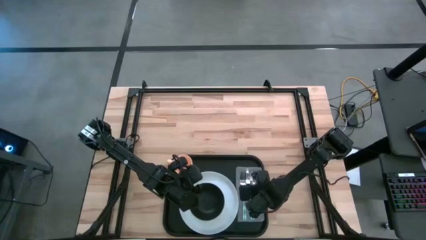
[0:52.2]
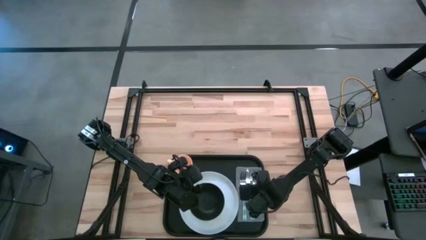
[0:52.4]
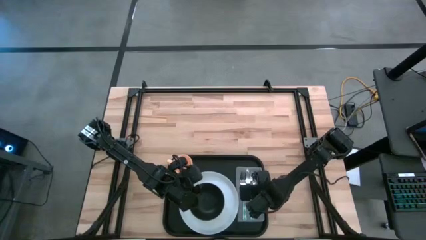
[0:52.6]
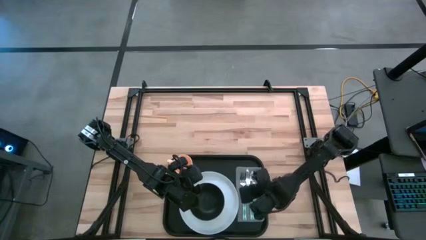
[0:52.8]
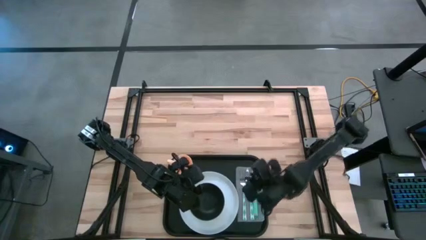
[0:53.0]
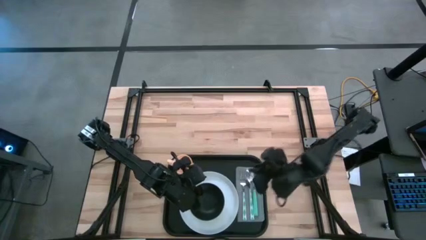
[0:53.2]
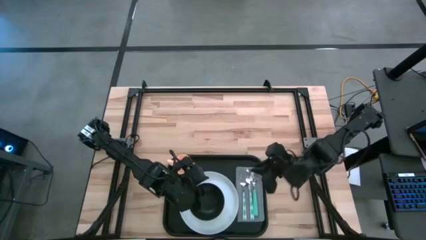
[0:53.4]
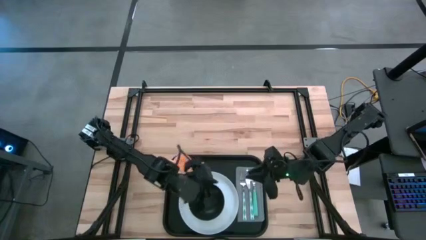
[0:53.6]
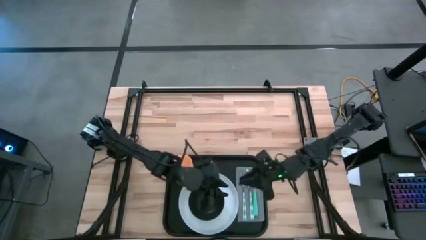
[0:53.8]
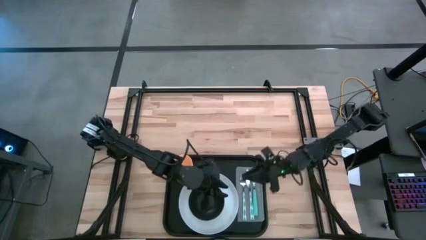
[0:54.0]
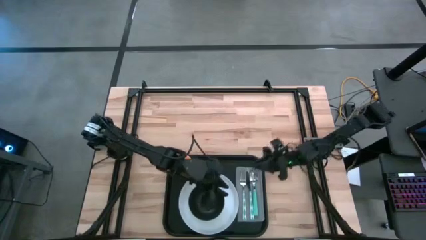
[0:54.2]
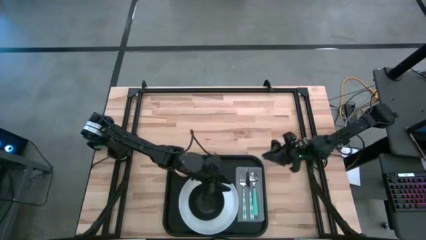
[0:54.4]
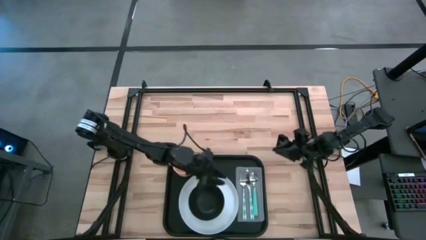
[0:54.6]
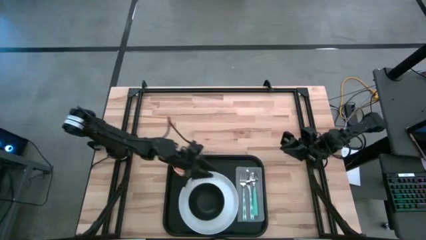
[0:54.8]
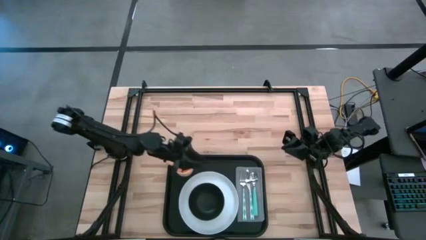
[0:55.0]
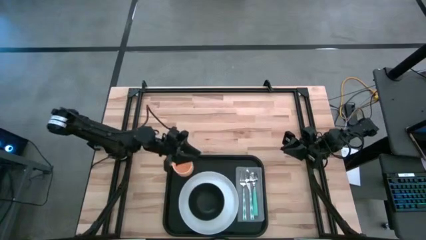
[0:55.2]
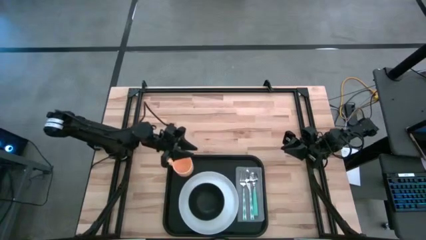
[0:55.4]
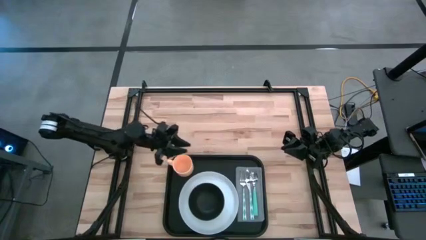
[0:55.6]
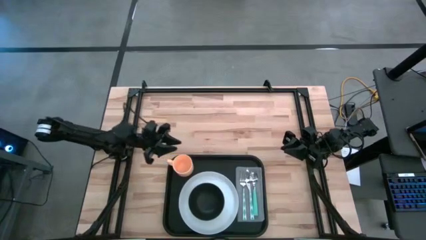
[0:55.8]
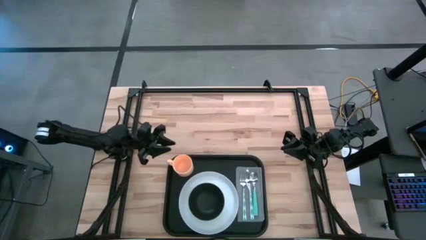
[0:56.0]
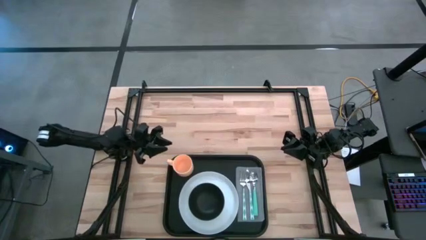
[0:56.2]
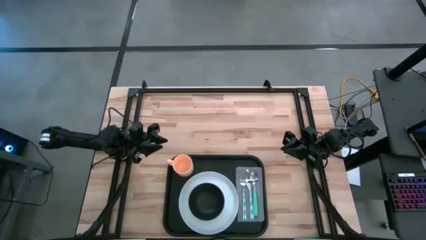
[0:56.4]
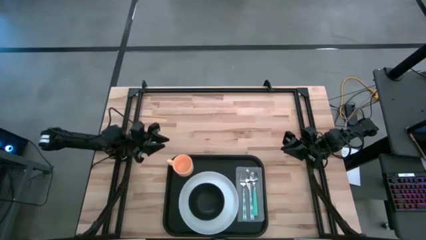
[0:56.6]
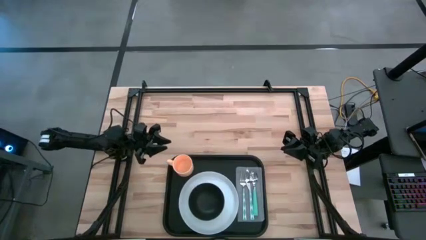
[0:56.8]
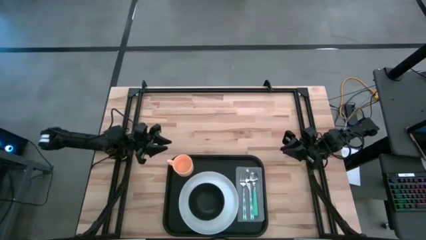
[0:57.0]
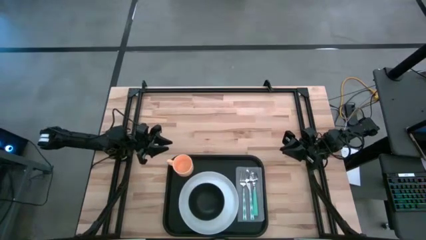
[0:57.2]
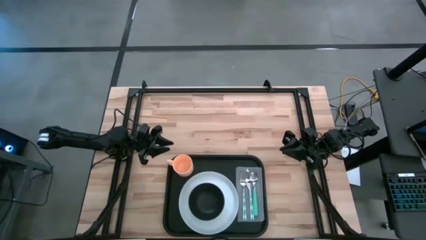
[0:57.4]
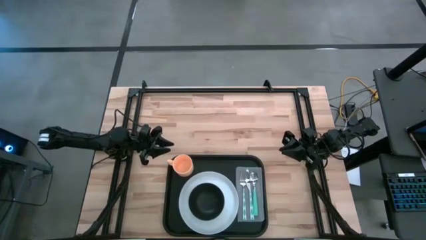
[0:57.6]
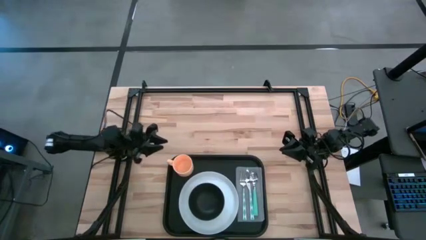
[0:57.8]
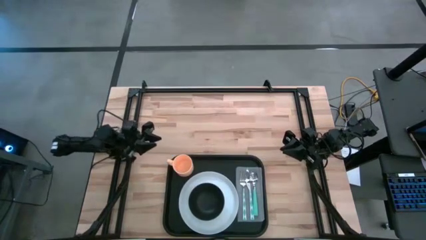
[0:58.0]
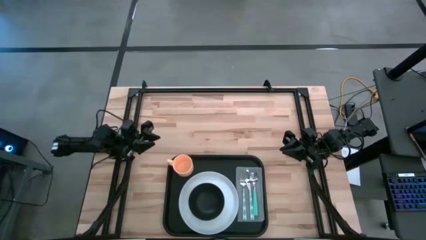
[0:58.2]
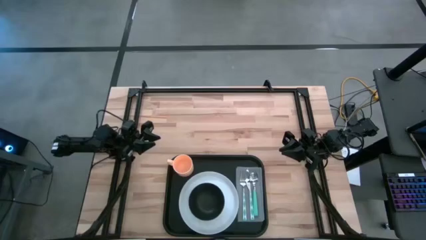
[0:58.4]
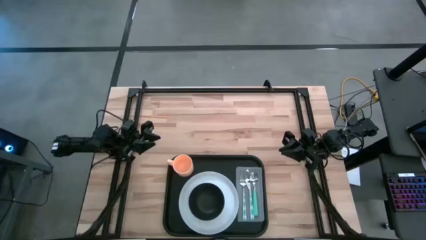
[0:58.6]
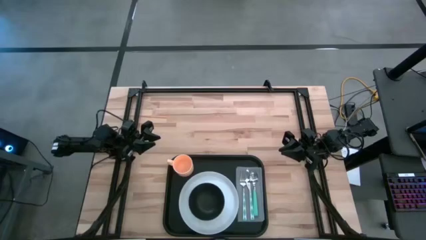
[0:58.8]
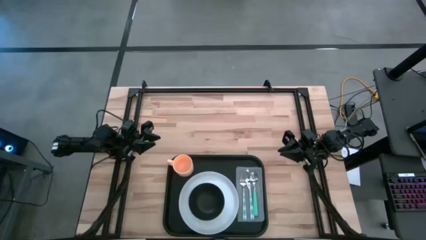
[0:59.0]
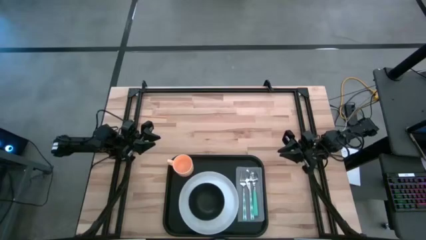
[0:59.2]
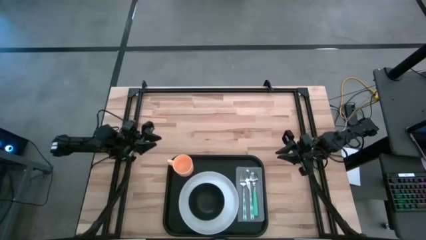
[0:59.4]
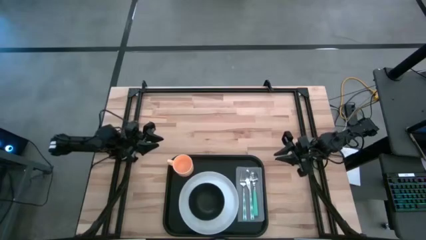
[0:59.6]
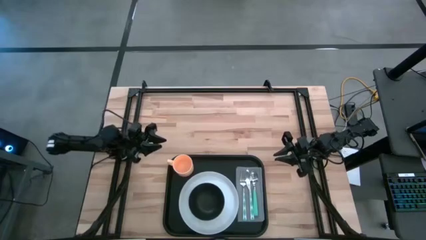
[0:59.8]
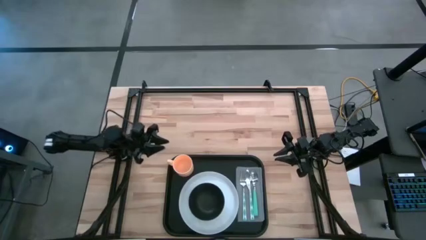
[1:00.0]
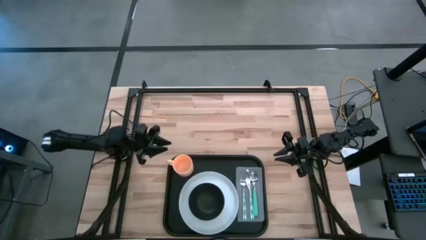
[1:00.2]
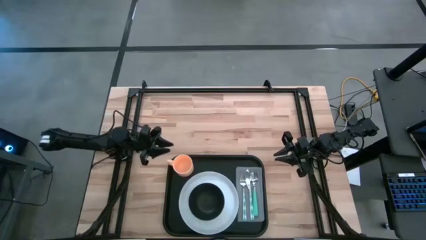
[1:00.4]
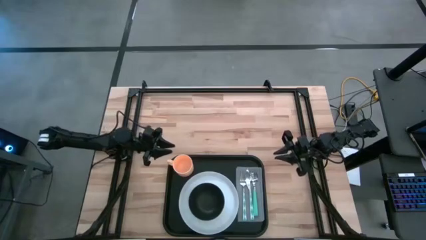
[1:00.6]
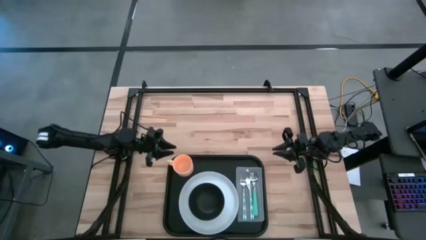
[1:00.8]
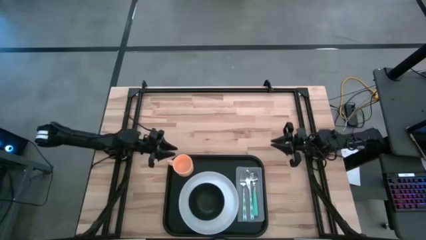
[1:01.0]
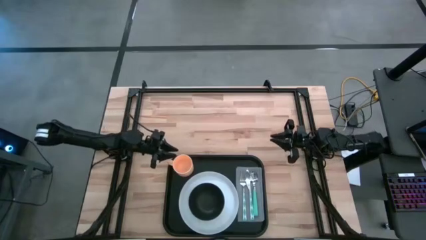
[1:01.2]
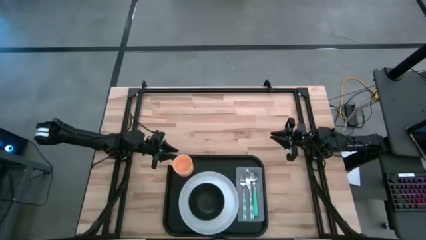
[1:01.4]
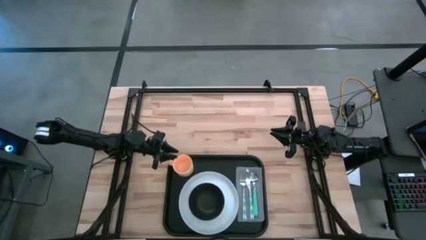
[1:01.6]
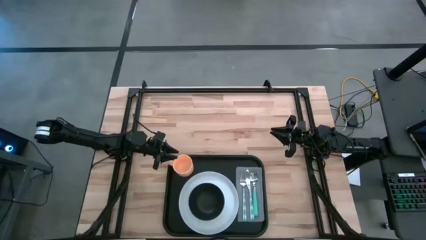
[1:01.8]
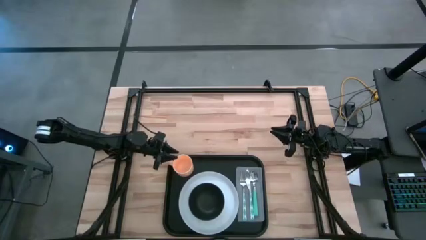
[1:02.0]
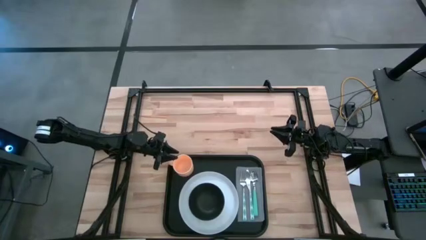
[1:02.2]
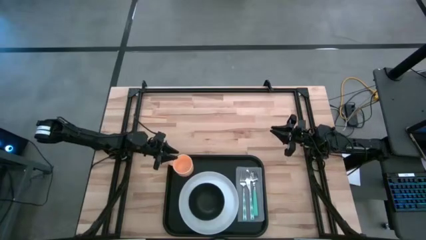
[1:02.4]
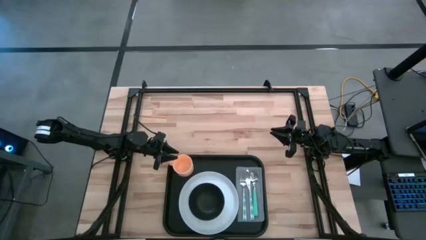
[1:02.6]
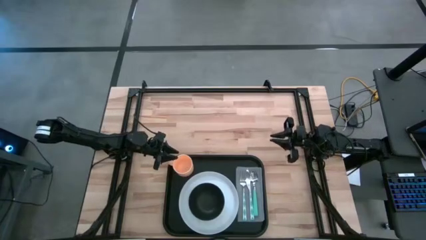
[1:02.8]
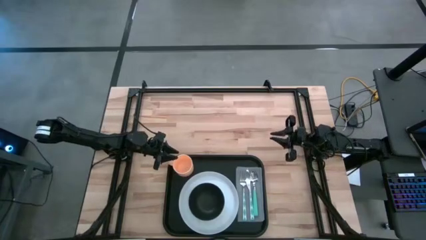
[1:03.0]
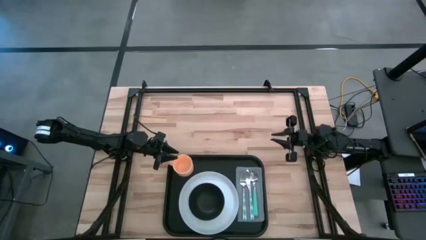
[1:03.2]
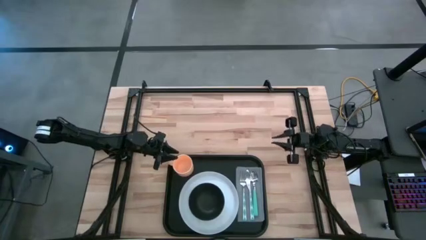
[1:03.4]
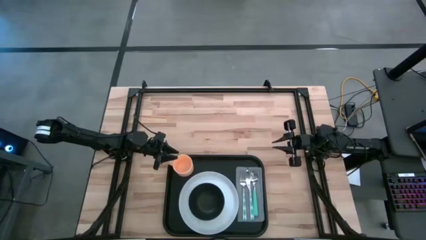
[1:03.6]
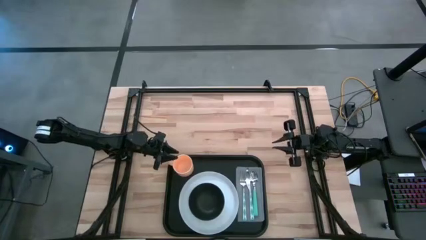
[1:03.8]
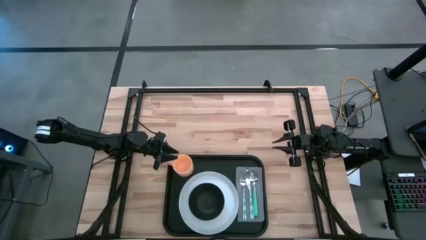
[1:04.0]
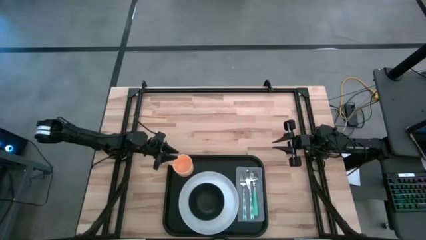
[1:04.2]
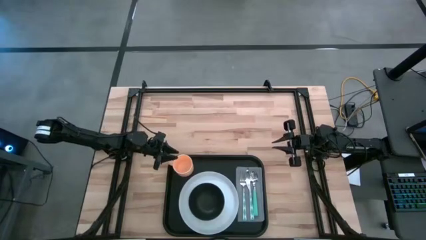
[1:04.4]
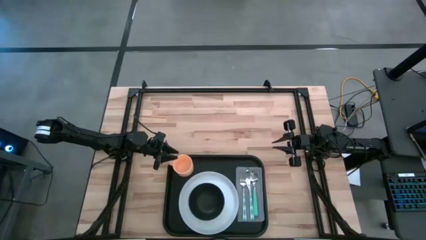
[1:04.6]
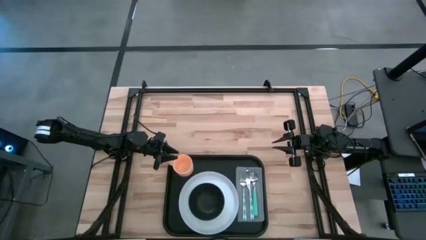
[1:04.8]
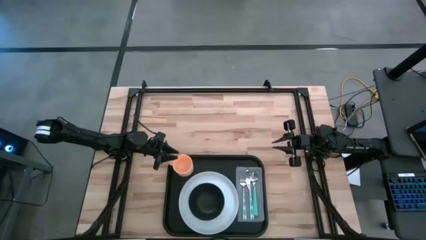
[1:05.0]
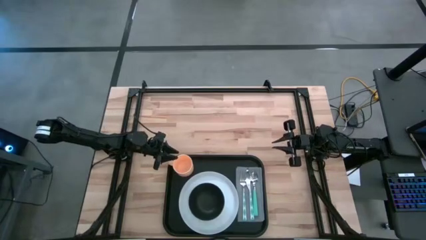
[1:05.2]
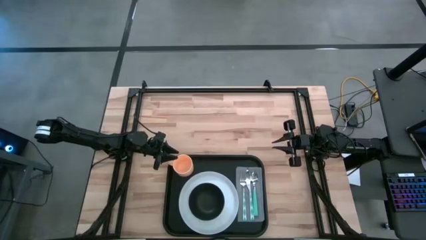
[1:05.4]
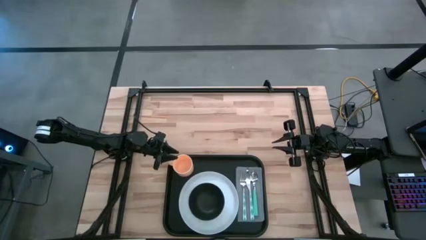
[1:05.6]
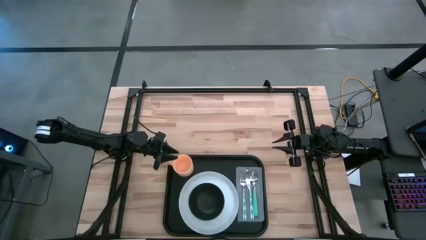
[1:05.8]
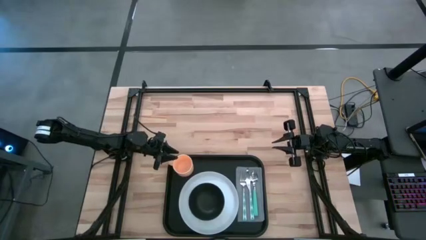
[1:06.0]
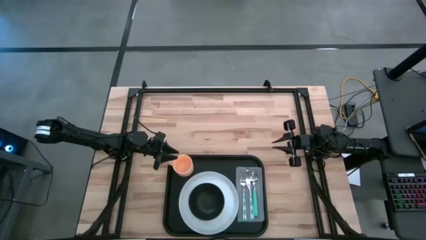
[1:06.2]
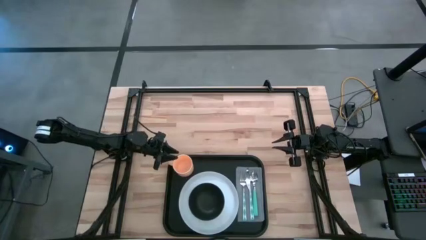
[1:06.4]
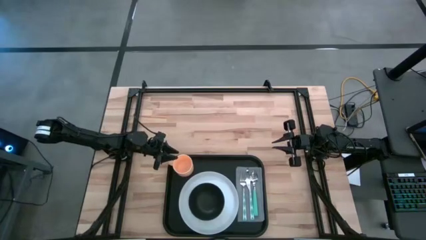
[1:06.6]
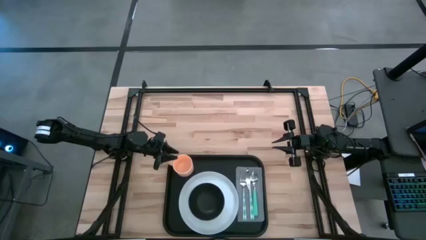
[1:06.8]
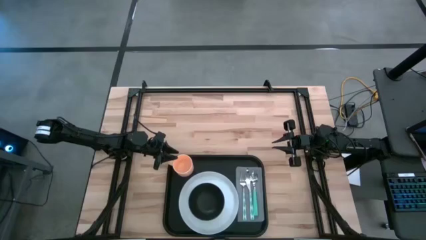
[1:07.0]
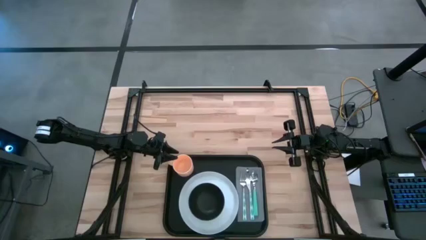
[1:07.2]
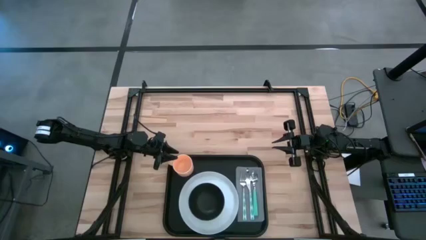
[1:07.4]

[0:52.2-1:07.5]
Task: Set up tray
Return to Home Position

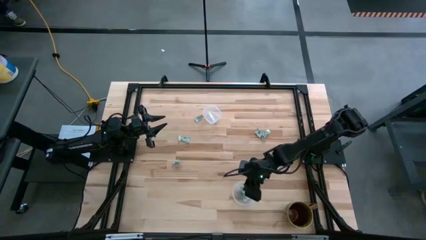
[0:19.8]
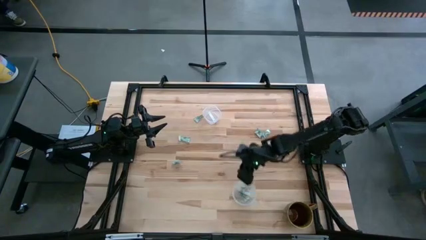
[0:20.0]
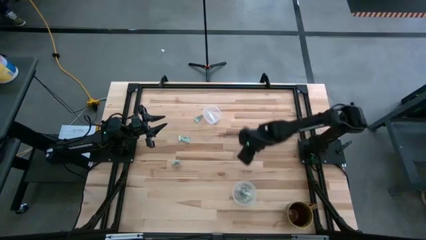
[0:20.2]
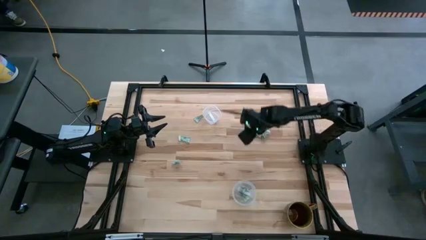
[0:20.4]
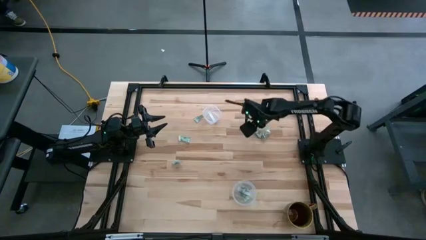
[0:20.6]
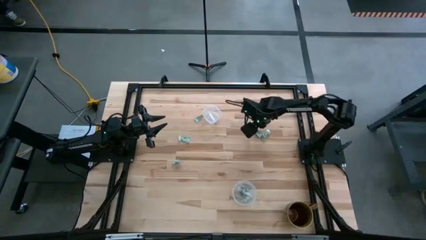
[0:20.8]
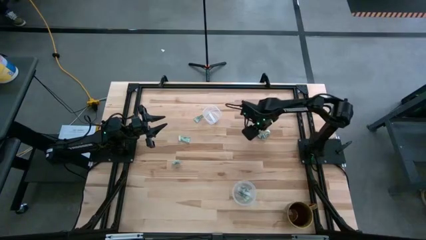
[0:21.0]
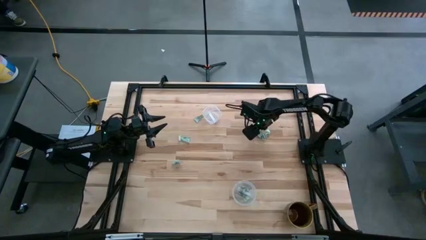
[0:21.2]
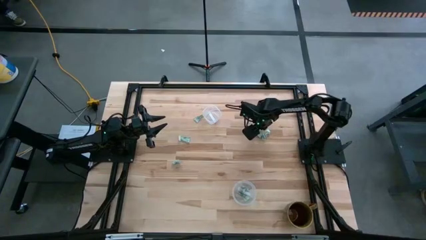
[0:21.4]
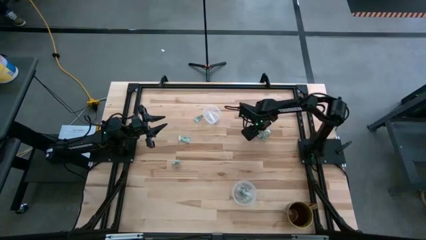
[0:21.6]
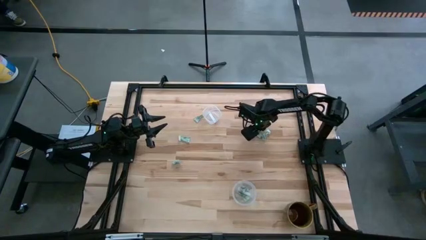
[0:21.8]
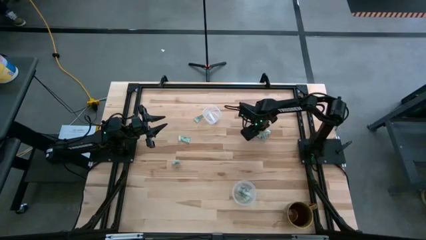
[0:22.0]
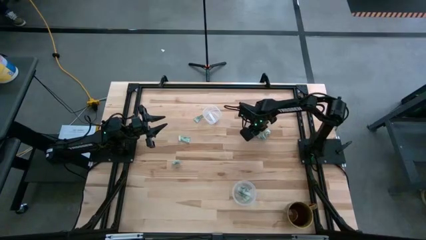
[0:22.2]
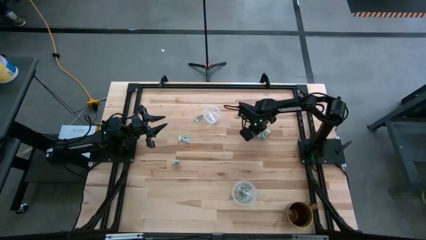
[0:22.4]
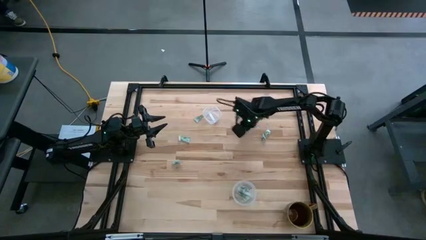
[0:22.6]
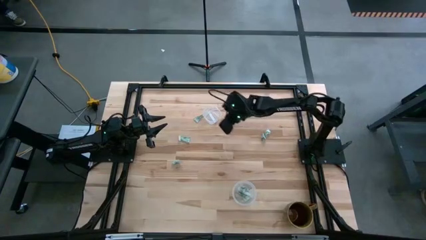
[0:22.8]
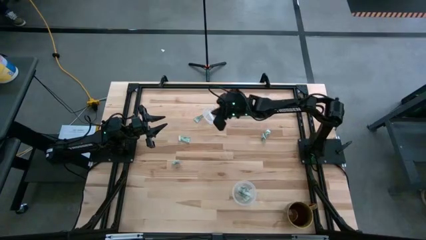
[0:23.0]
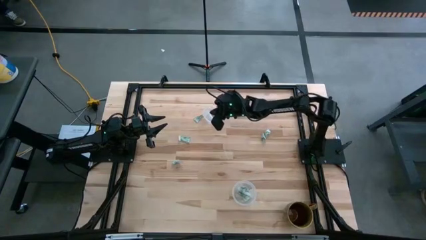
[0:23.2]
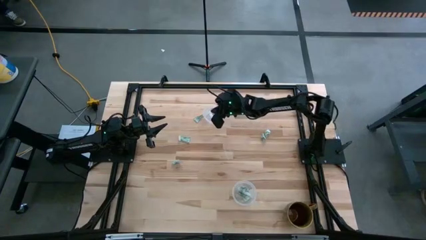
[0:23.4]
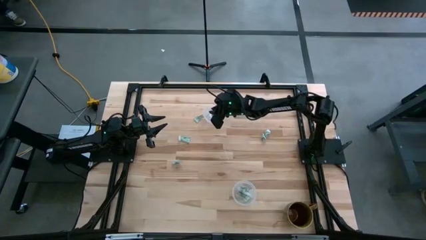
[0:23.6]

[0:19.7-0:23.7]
Task: Pick and place Stevia / Truvia into bins
Put the stevia packet into the top transparent container
